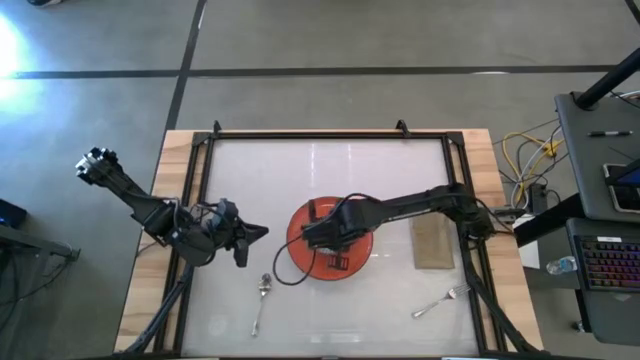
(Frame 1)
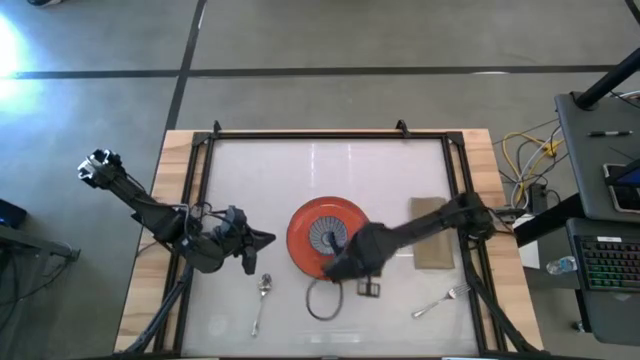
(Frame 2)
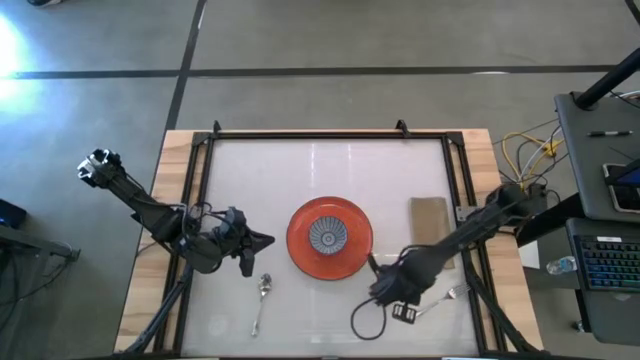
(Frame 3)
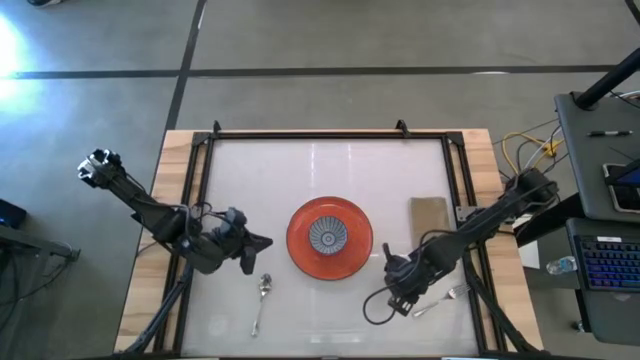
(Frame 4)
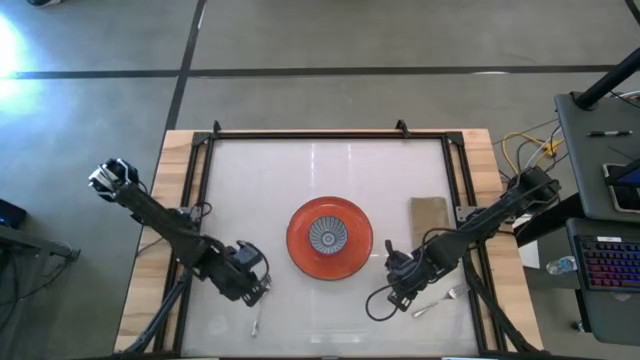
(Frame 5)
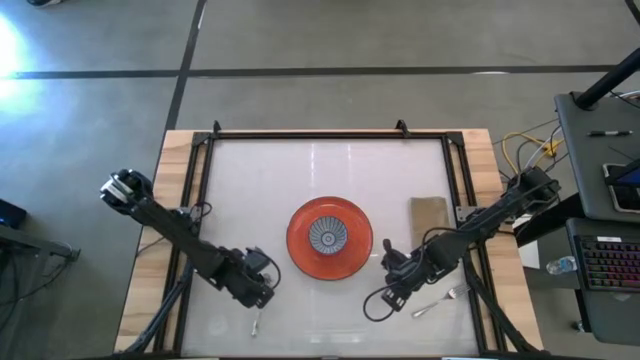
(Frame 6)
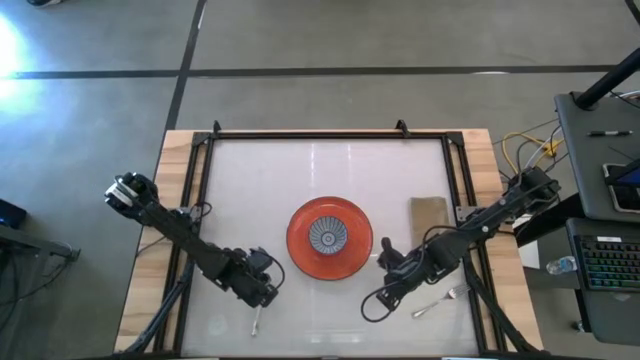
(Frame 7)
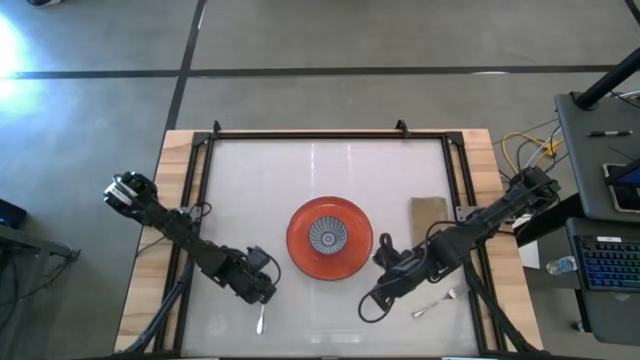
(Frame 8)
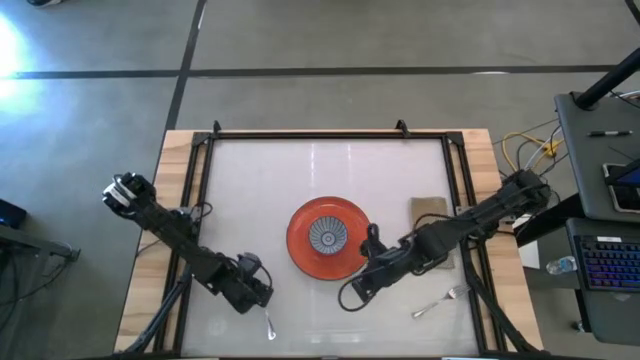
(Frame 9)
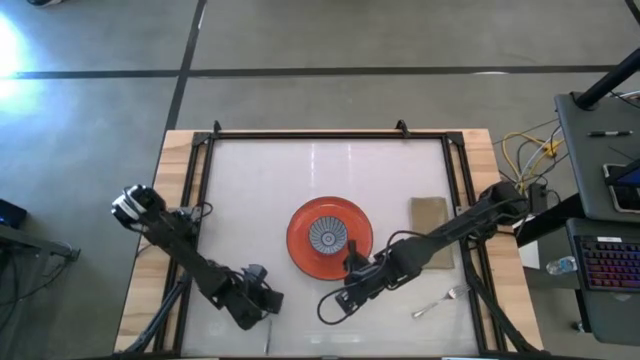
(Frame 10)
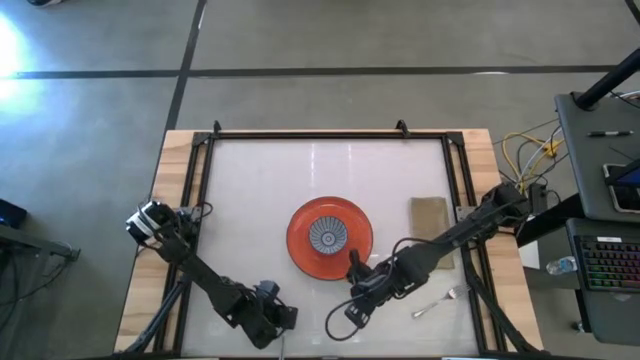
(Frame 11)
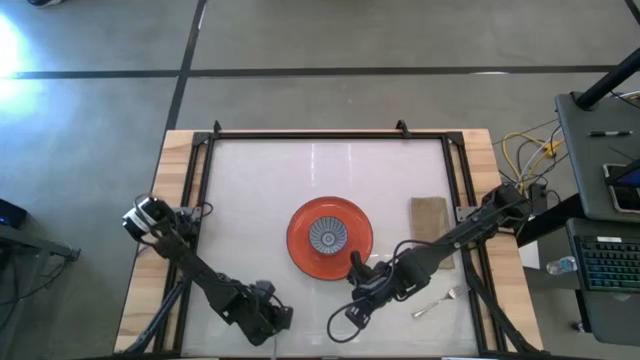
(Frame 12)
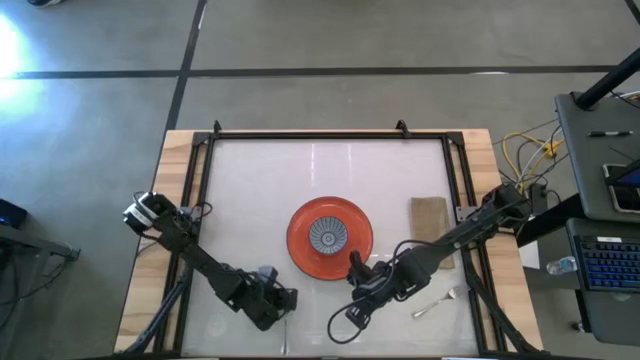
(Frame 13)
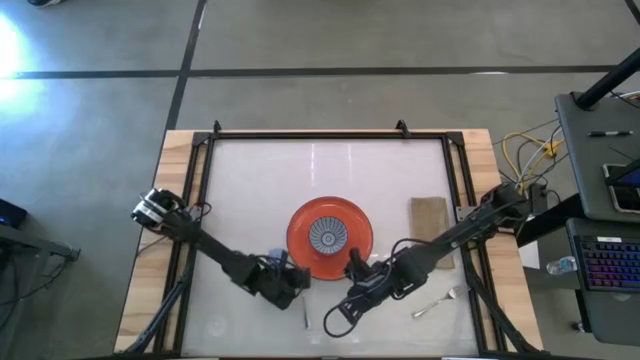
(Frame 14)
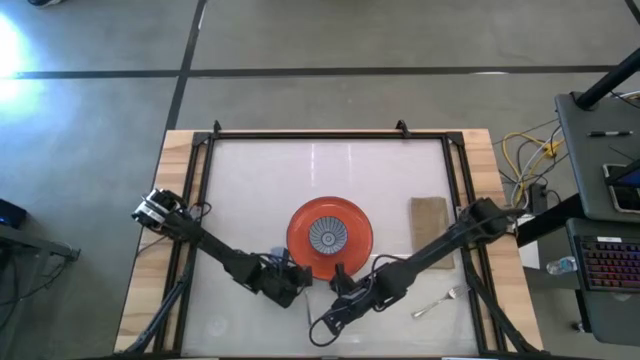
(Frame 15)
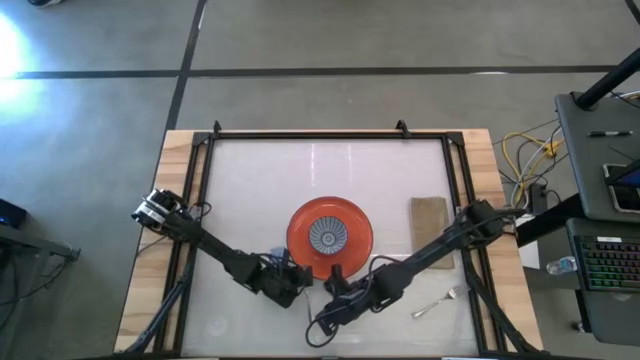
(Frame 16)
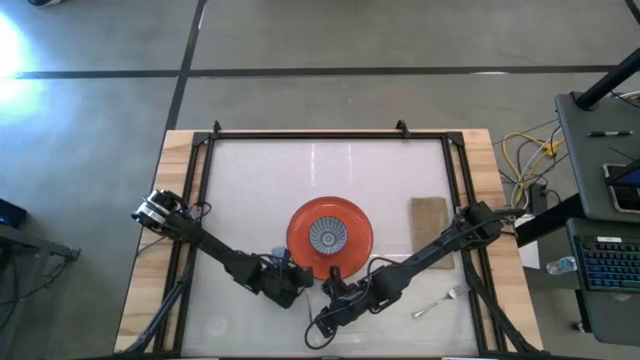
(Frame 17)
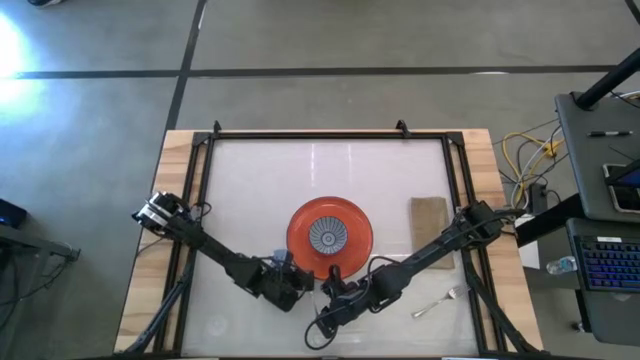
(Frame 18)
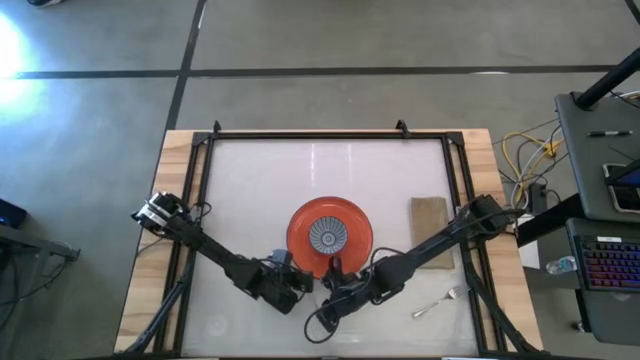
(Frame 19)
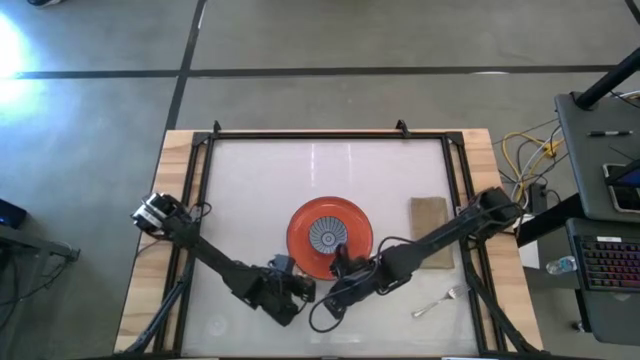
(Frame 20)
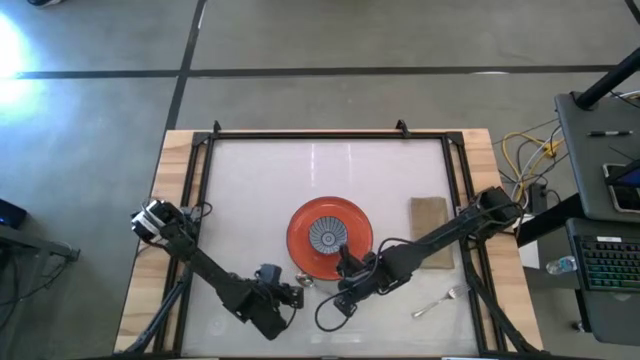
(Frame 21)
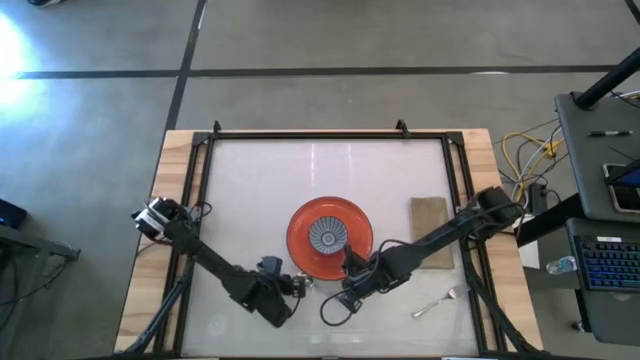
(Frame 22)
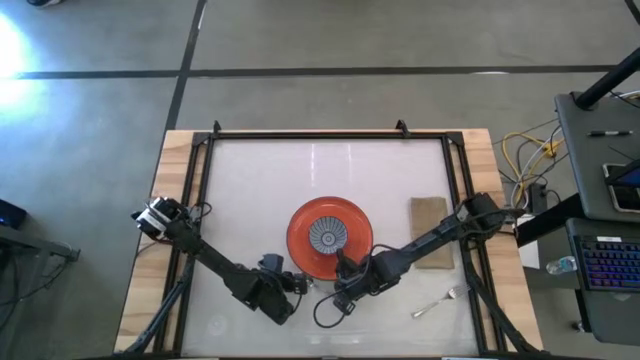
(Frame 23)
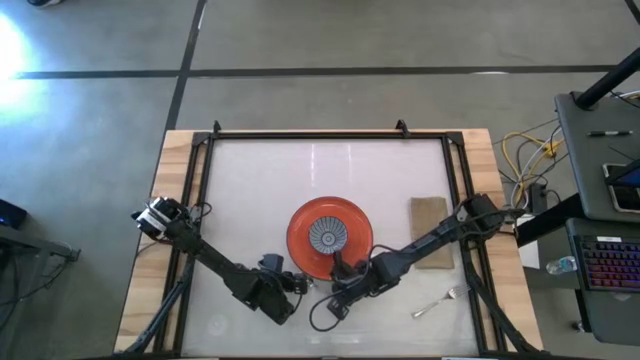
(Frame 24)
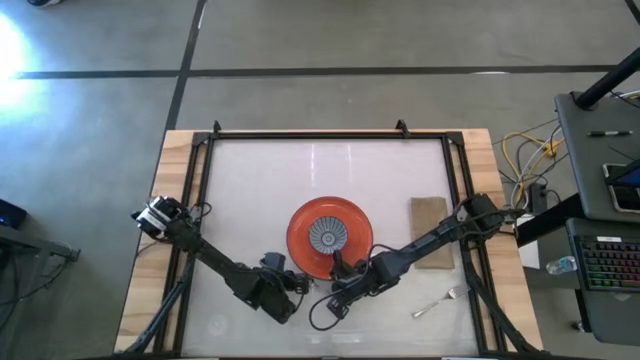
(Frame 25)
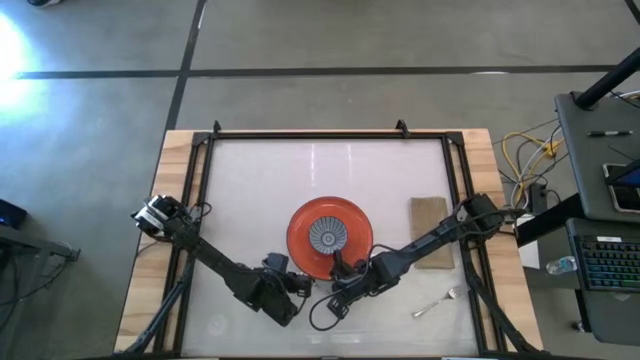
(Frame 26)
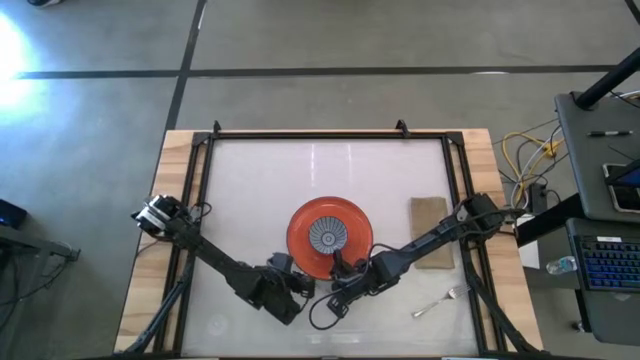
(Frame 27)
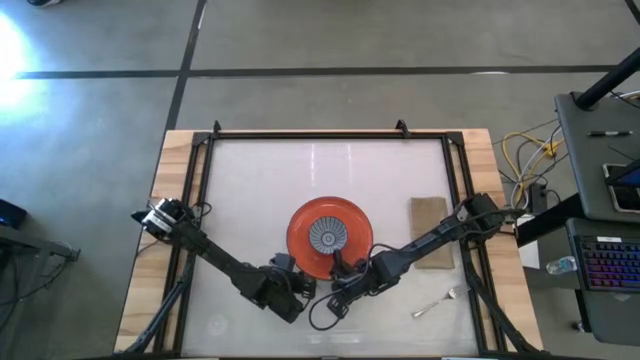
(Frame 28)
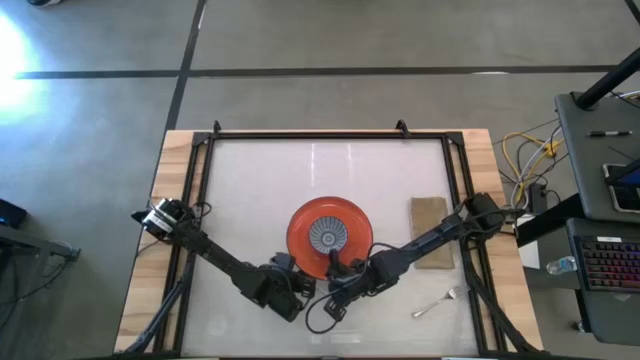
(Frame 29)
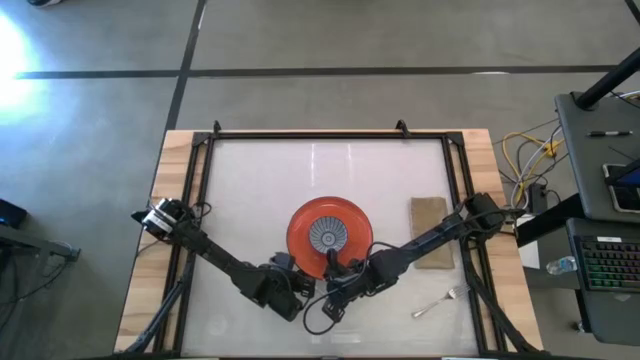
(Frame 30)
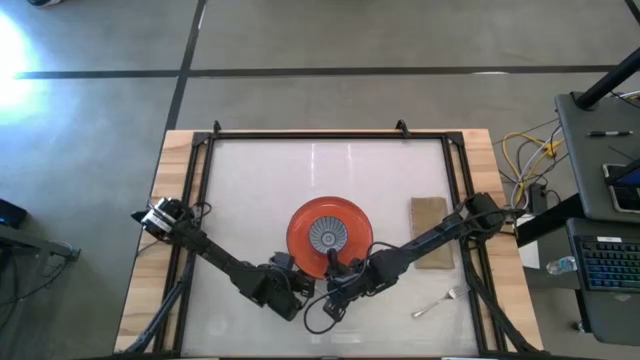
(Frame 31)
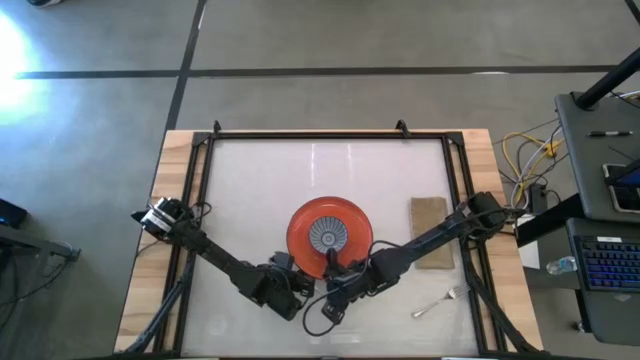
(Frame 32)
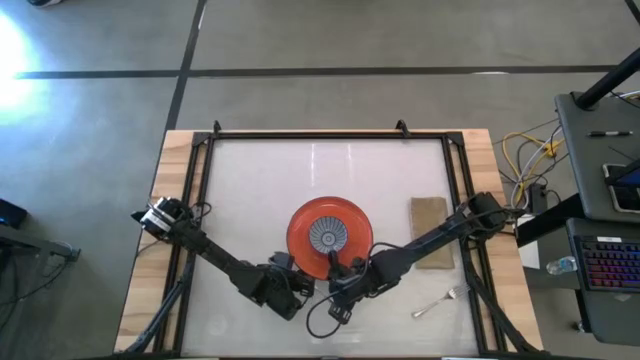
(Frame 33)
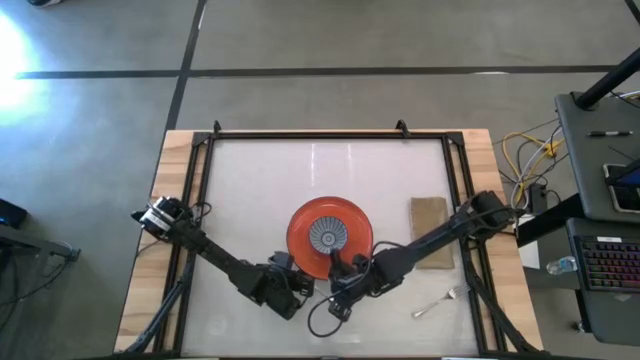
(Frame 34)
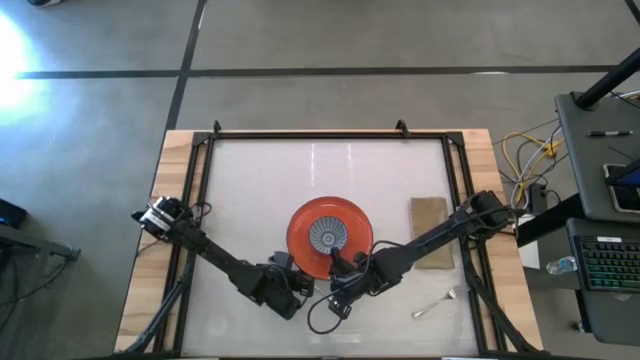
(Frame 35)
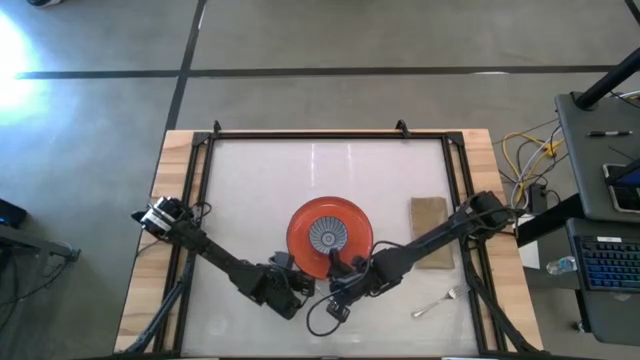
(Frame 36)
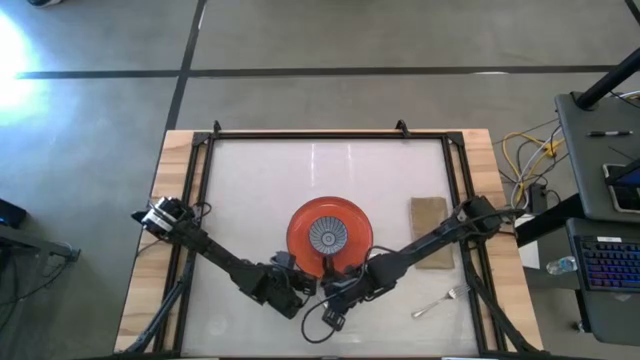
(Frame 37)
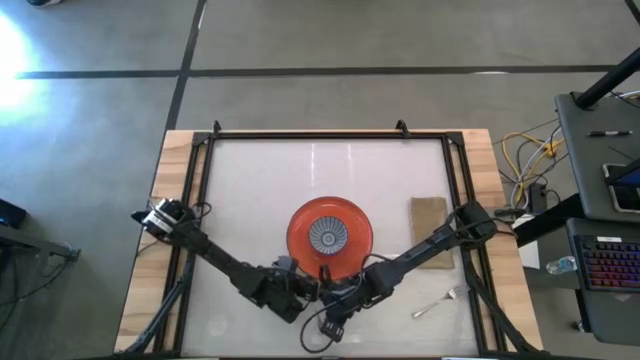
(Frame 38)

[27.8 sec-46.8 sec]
Task: Set table place
Put the spoon into the blue bowl

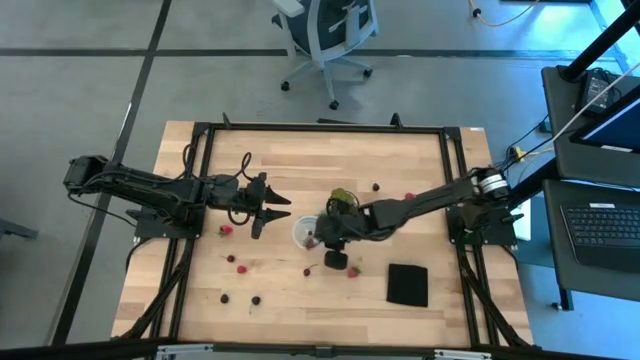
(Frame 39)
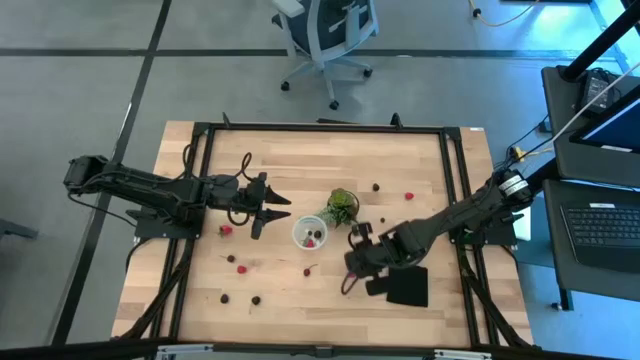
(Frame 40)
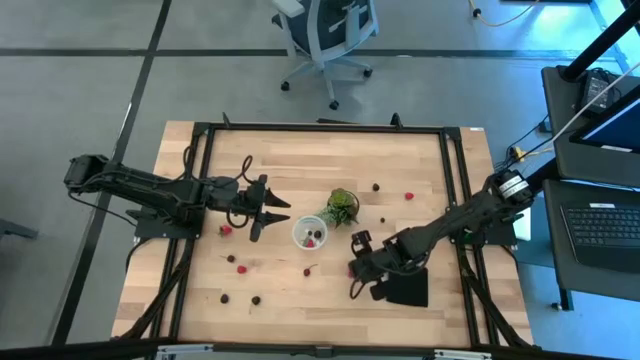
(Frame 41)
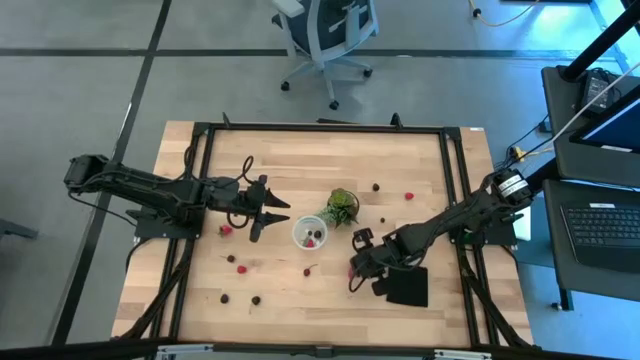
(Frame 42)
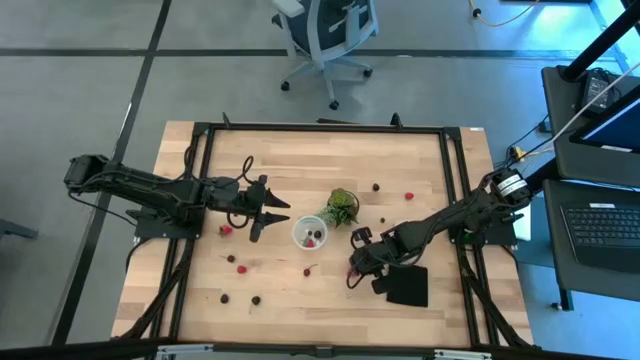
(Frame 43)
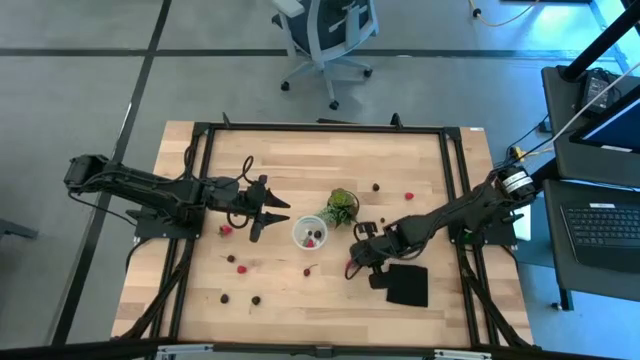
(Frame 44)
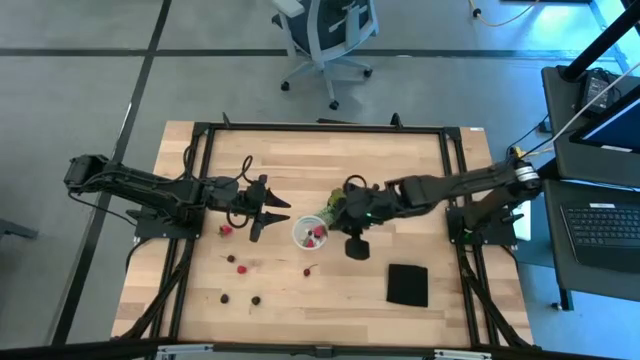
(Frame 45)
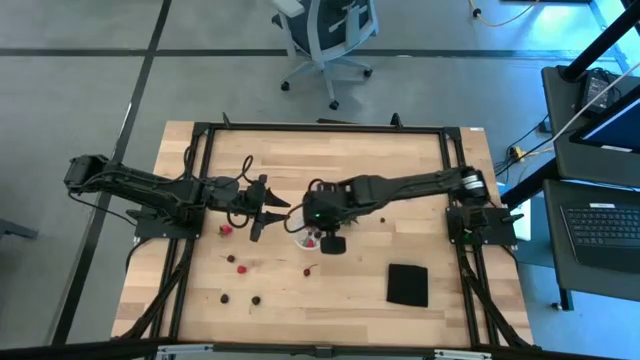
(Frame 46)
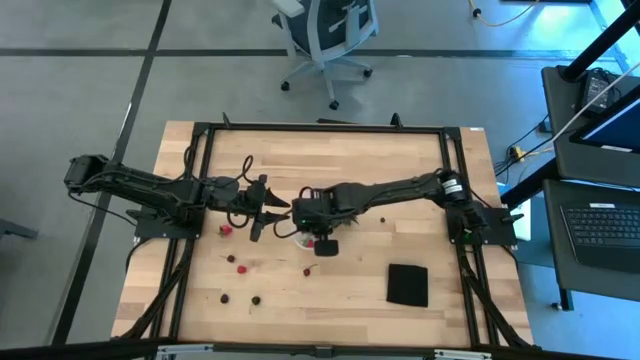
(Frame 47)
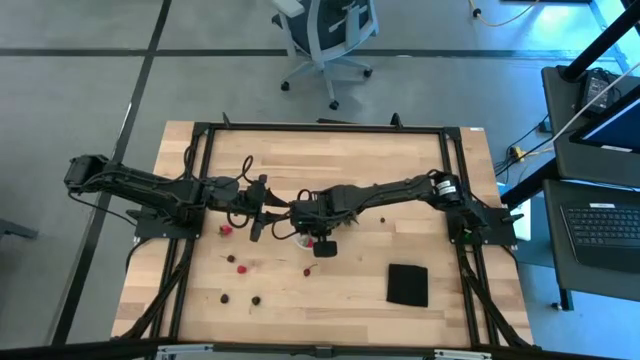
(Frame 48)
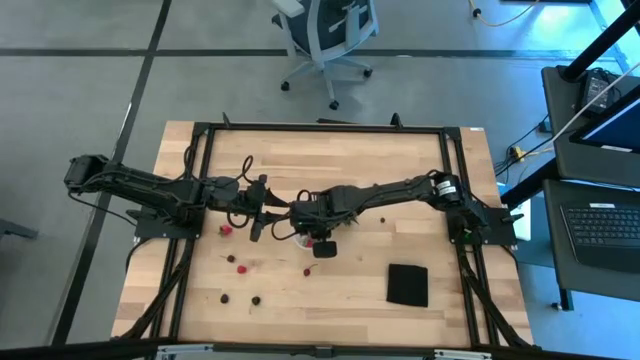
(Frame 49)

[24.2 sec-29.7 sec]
Task: Pick and placing Produce into tupperware
Put the right strawberry into the transparent container
